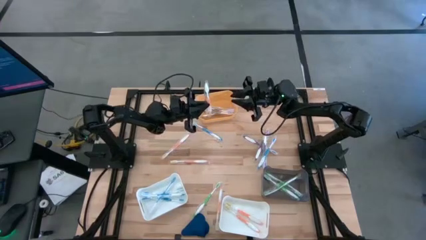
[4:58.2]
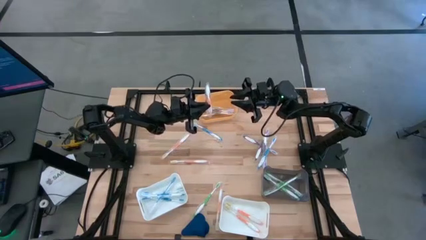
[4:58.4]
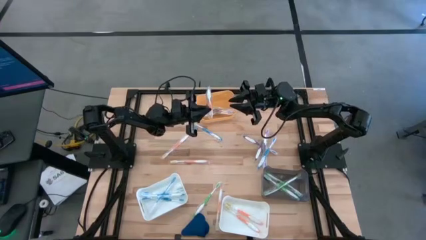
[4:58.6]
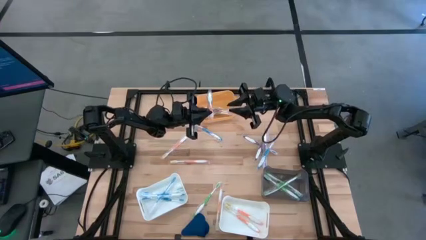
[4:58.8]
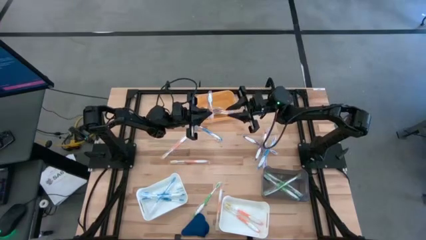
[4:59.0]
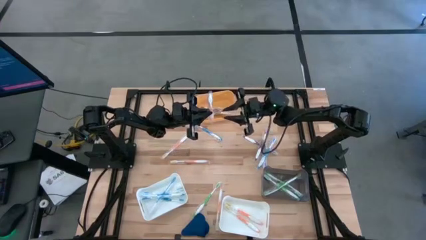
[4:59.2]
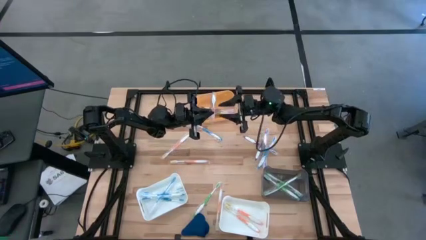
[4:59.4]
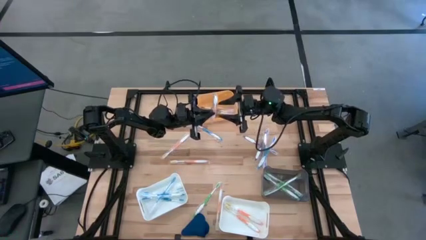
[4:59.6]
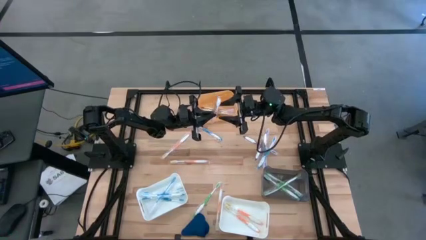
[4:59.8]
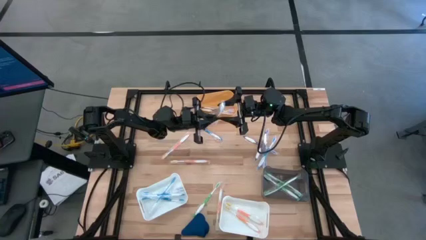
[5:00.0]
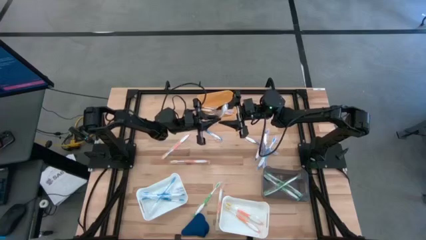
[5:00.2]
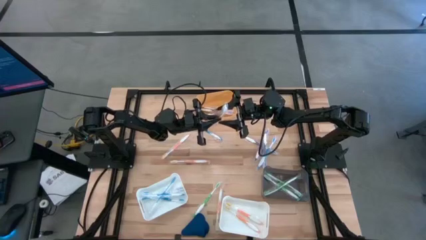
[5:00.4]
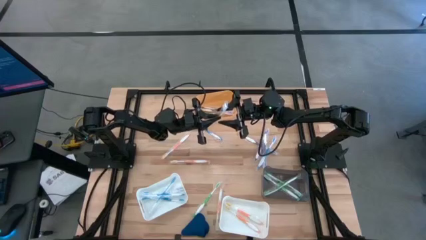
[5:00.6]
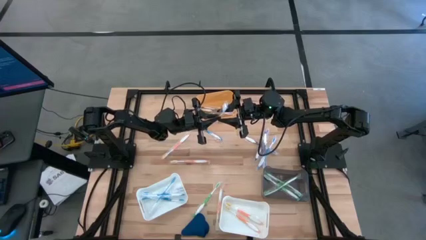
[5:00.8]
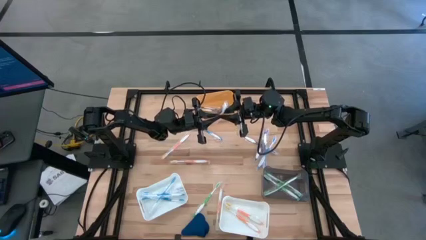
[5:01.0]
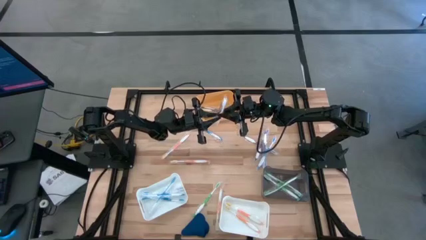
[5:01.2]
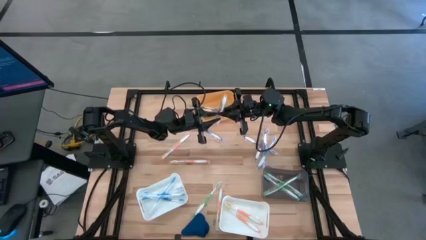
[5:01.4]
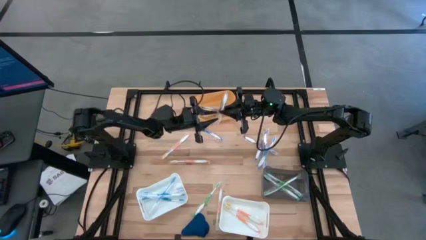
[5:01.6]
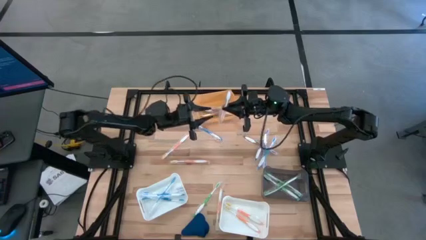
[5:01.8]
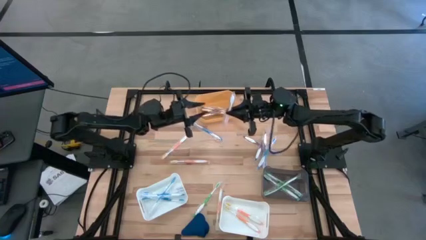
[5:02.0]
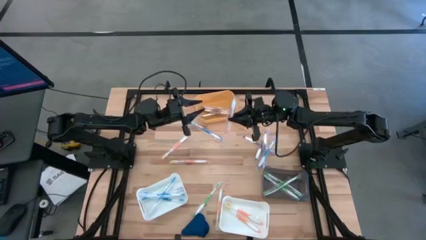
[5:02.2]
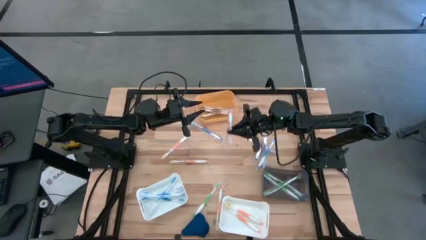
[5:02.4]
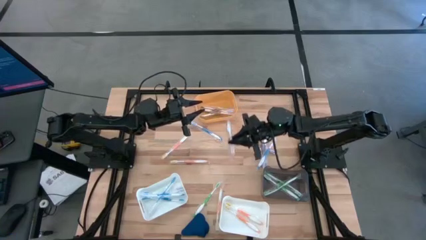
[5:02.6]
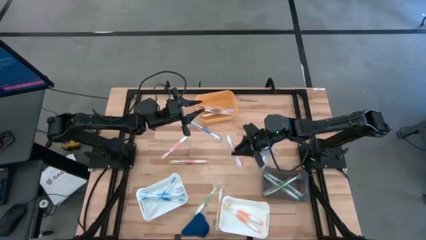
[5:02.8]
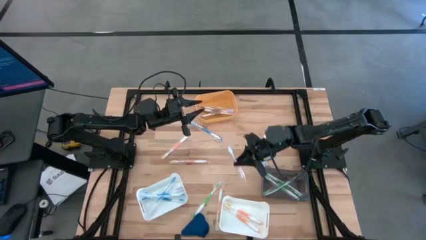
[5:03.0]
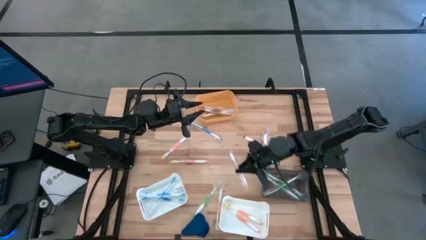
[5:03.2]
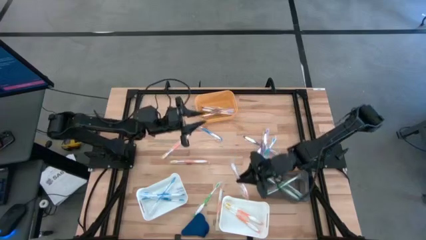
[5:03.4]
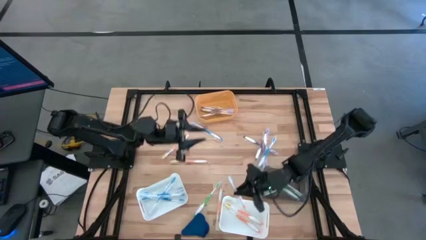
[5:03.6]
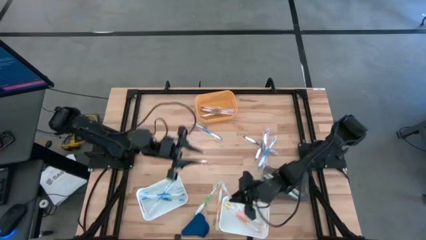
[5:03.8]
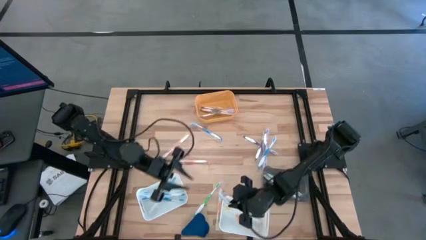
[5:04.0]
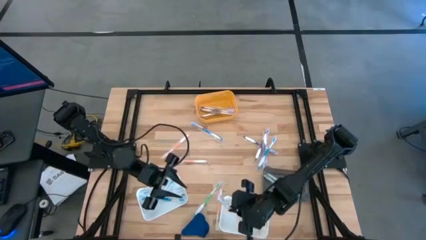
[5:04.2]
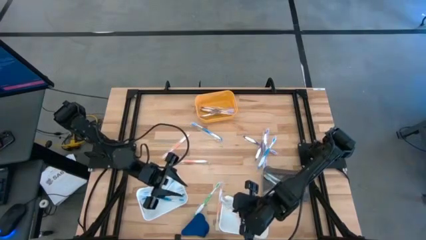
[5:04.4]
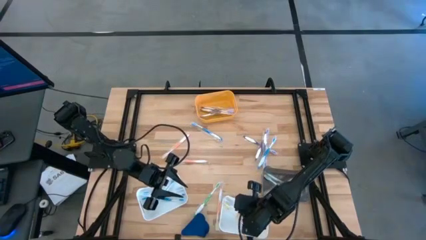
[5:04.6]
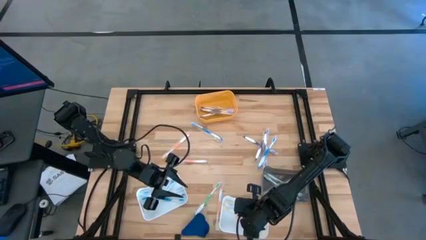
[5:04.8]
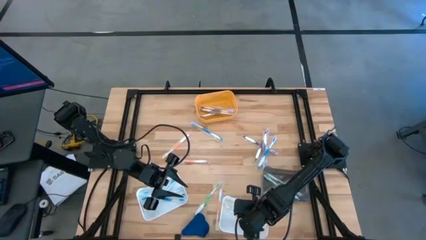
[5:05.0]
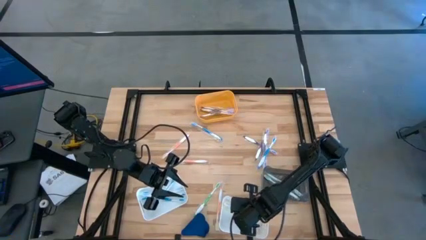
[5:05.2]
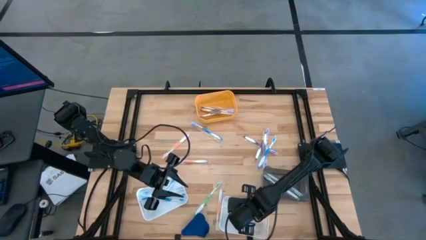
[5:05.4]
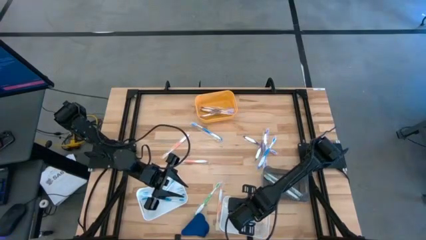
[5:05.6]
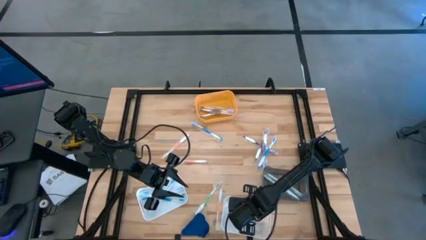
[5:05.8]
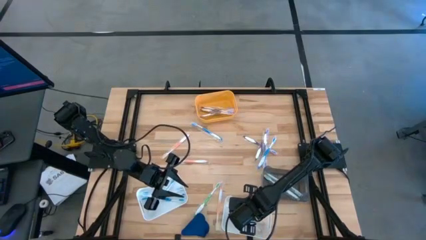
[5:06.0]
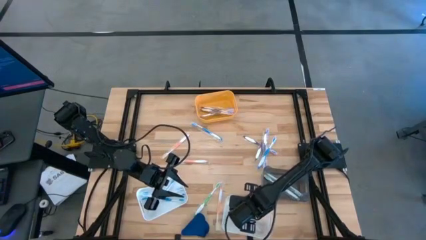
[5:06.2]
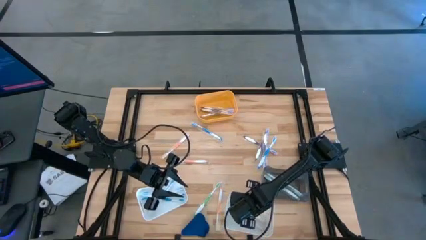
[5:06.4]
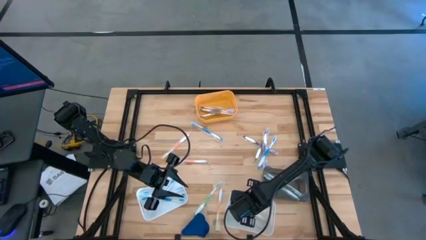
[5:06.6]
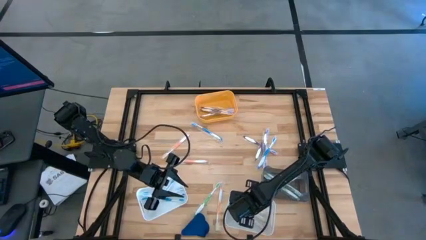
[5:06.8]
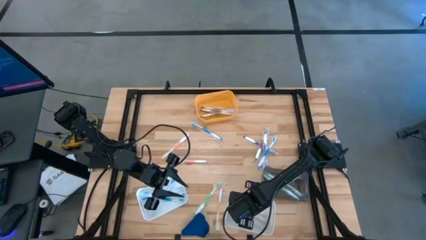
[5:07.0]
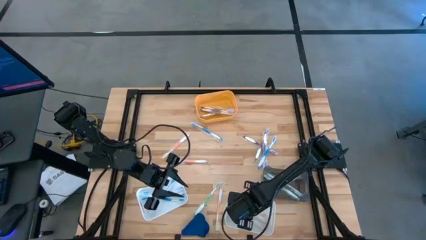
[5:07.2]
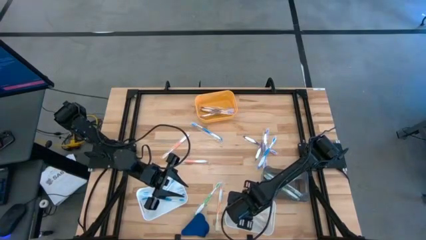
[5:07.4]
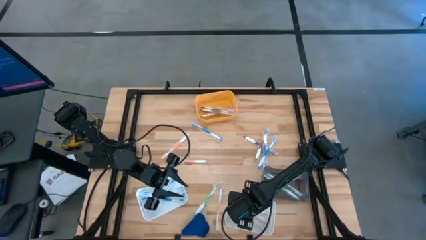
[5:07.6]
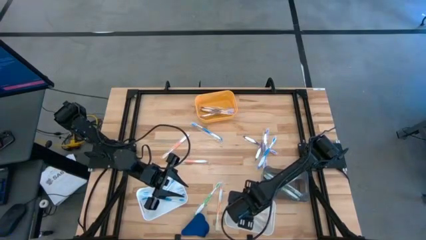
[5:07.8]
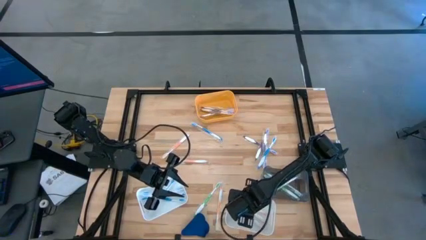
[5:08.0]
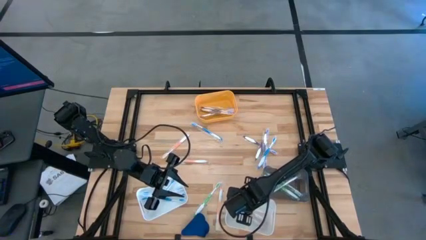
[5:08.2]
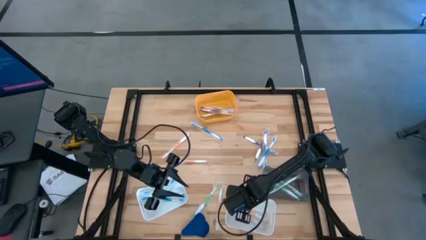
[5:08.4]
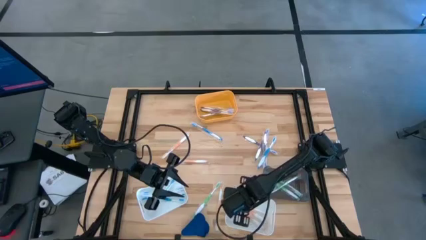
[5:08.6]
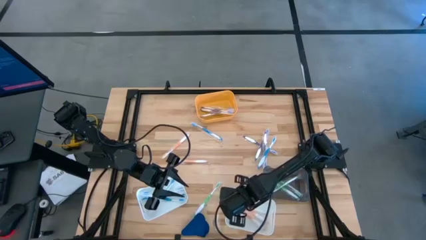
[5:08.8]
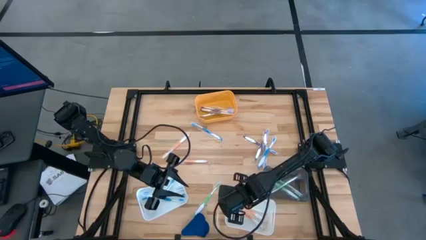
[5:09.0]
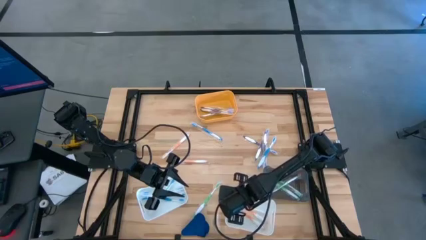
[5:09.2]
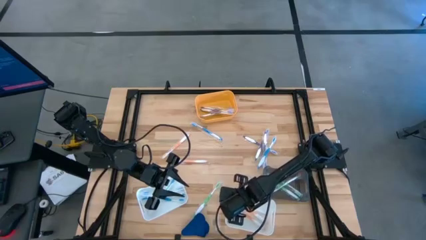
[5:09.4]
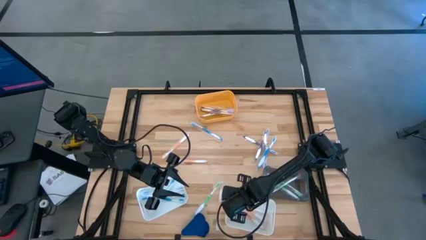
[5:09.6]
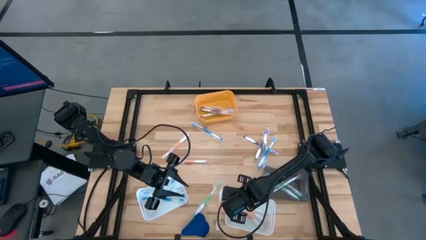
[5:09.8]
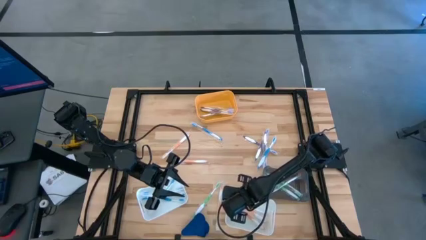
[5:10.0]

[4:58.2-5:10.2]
Task: Pick & Place Toothbrushes
Put the orange toothbrush into the right white bin

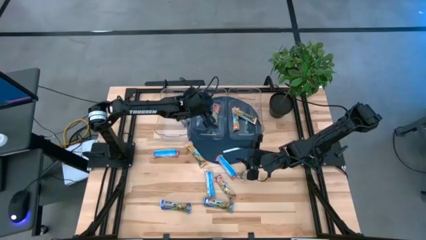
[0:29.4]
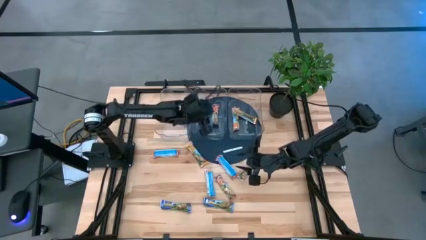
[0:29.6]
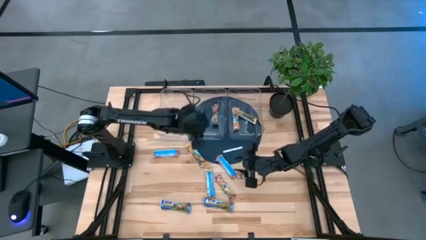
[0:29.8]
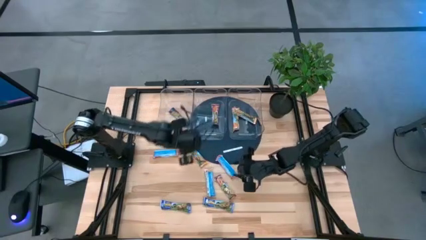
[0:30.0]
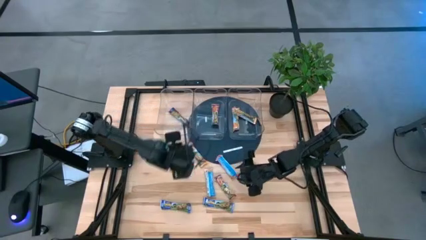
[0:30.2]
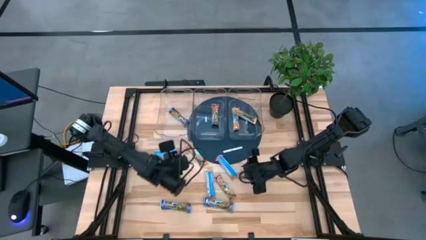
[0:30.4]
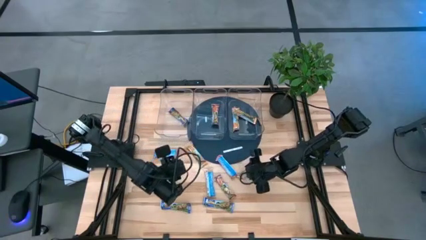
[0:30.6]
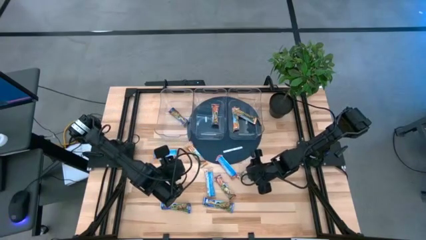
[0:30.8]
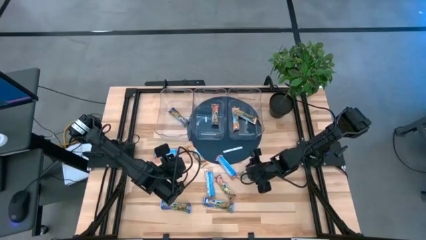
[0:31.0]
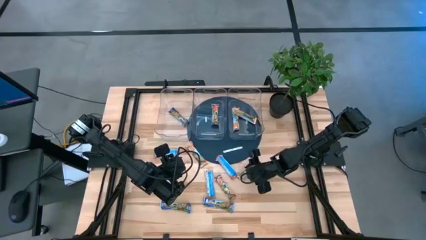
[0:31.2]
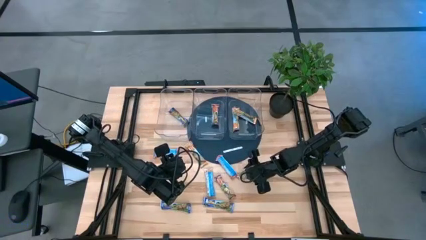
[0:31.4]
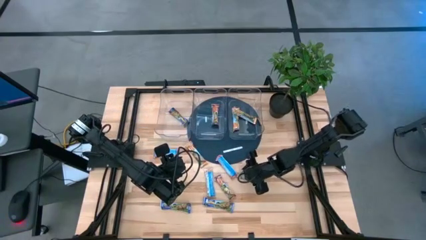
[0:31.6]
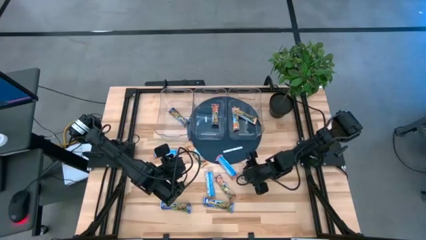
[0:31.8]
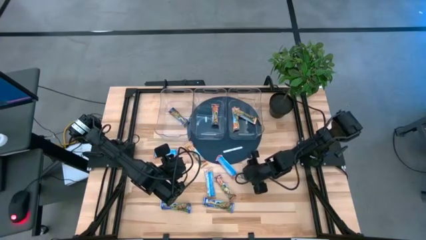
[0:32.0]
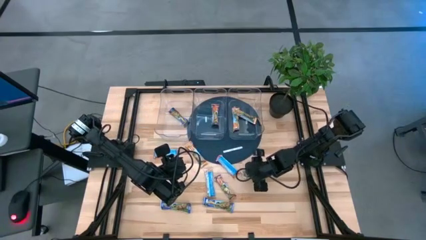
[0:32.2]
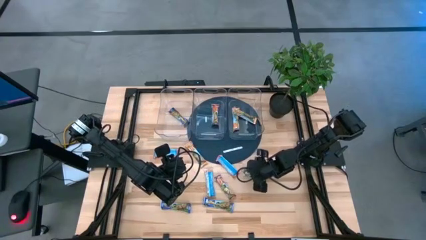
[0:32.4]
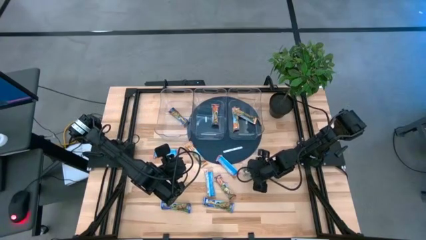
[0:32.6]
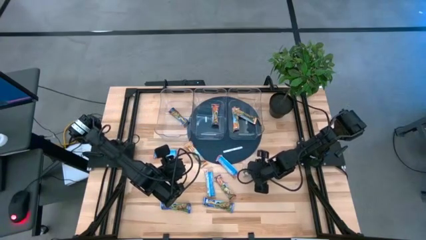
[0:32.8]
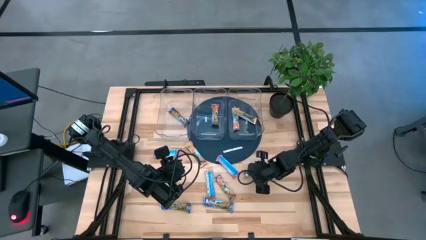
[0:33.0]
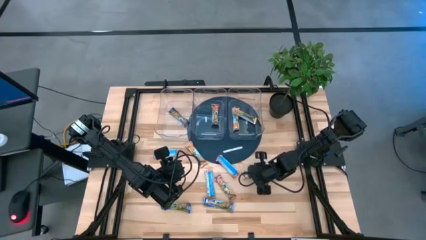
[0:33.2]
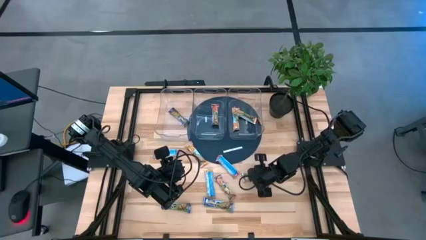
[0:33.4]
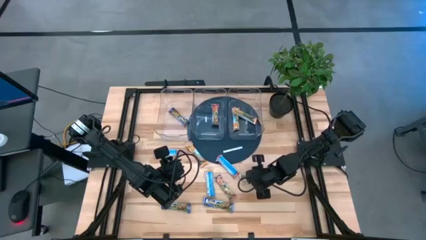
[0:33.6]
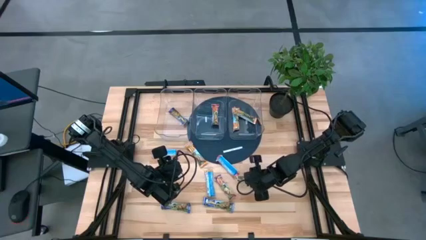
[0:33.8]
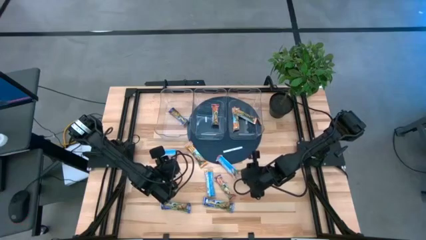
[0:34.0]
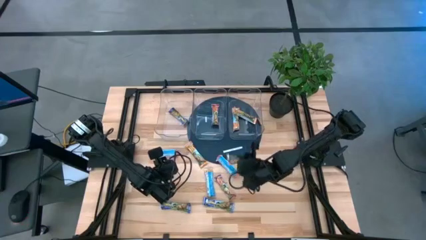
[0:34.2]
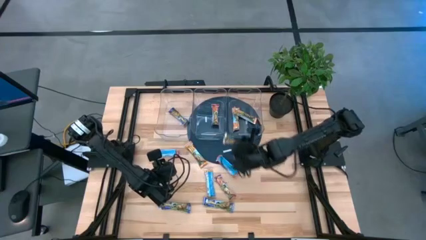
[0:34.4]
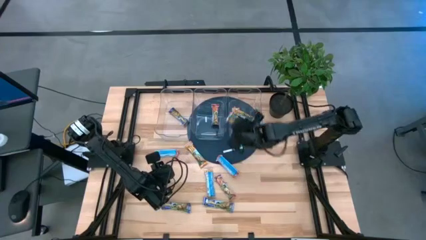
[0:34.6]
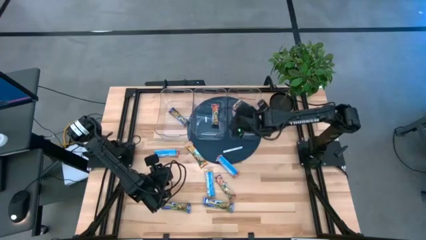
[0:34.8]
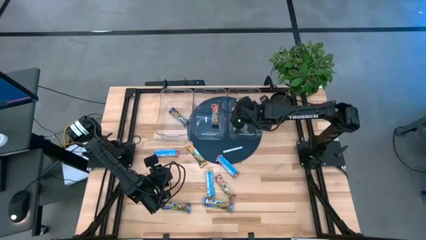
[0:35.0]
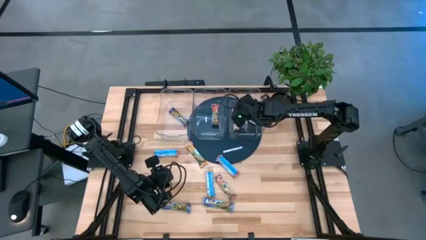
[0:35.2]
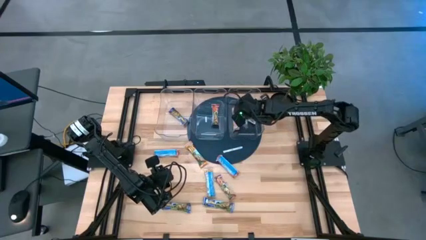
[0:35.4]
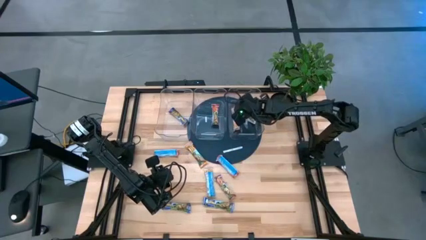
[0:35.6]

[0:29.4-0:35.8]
Task: Pick and place Granola Bars by type
Put the orange granola bar into the right transparent bin
